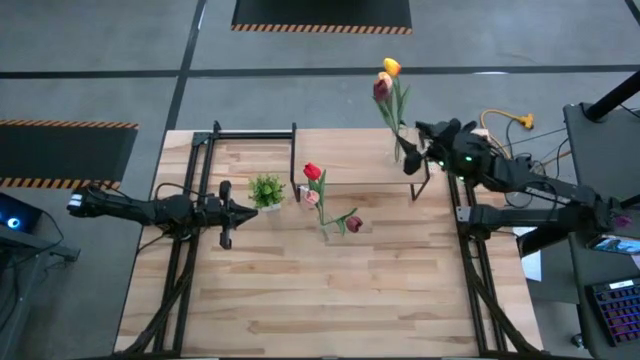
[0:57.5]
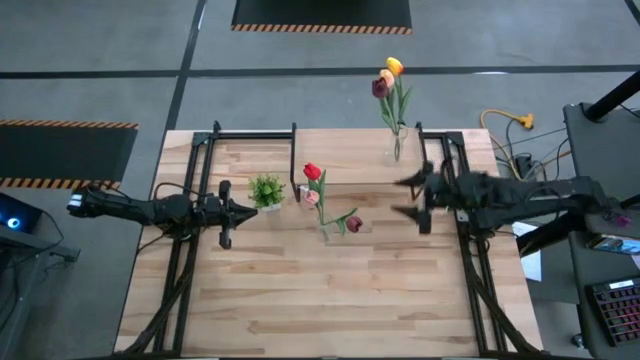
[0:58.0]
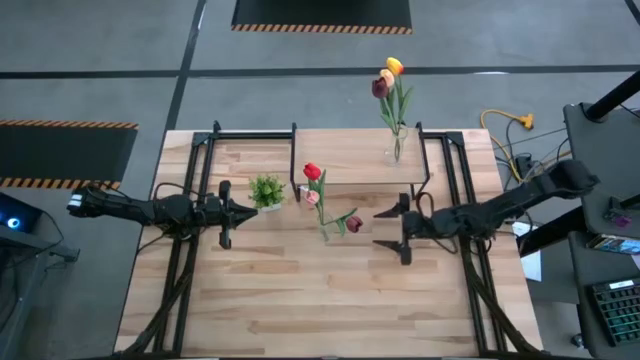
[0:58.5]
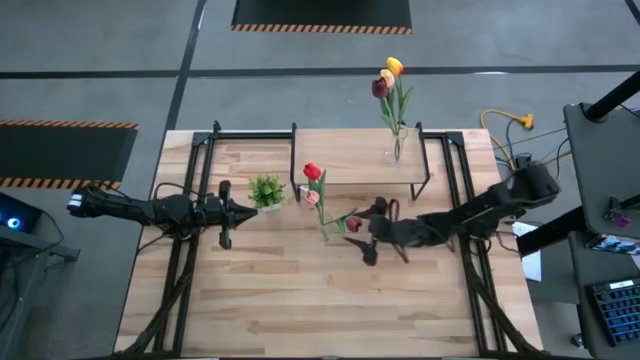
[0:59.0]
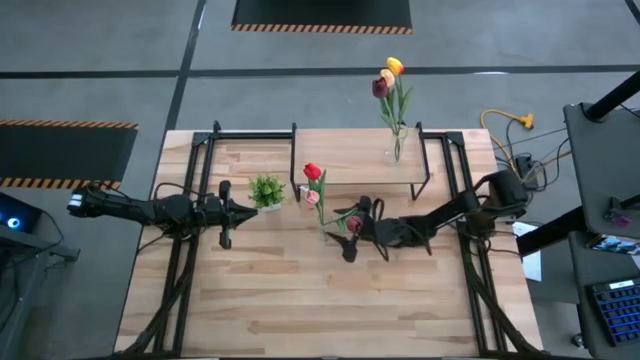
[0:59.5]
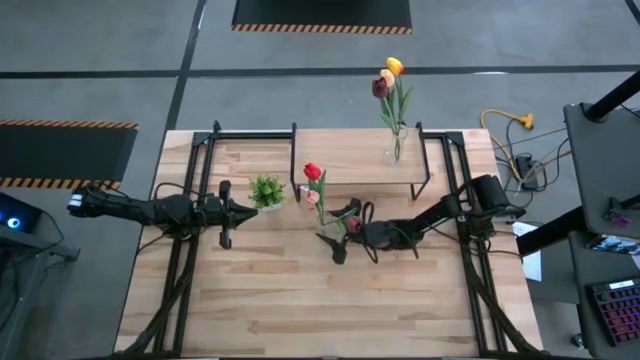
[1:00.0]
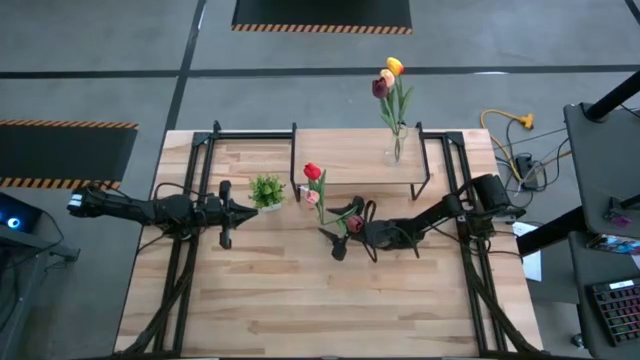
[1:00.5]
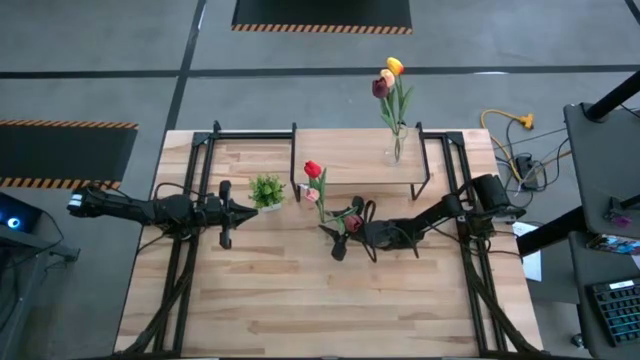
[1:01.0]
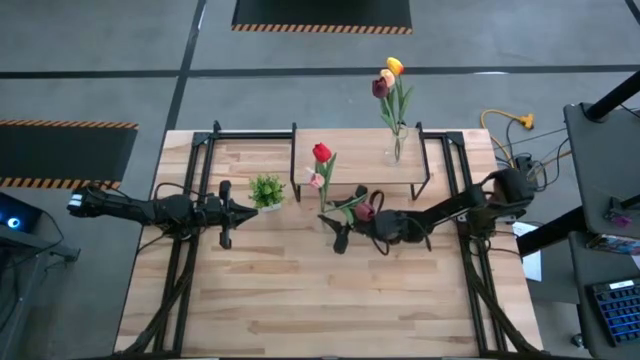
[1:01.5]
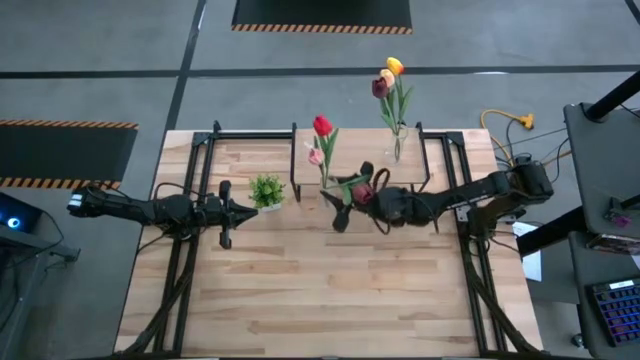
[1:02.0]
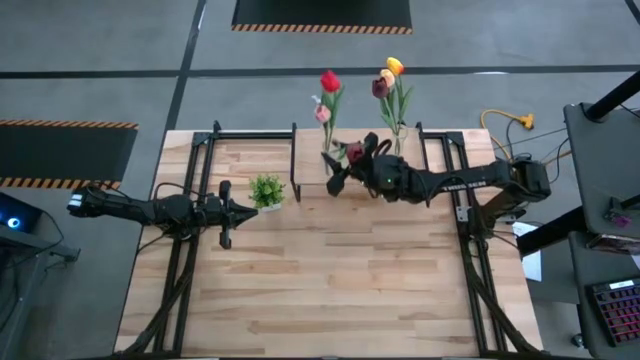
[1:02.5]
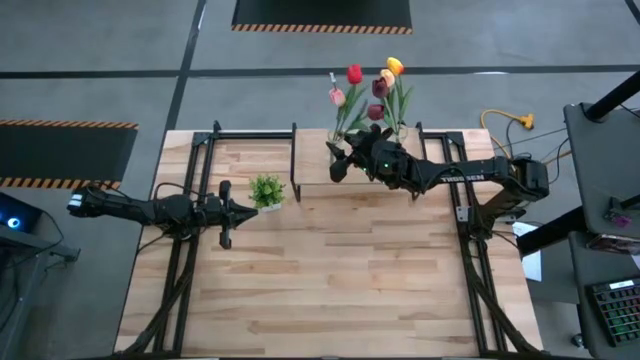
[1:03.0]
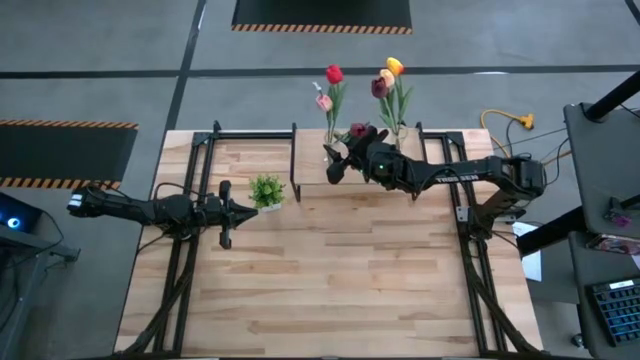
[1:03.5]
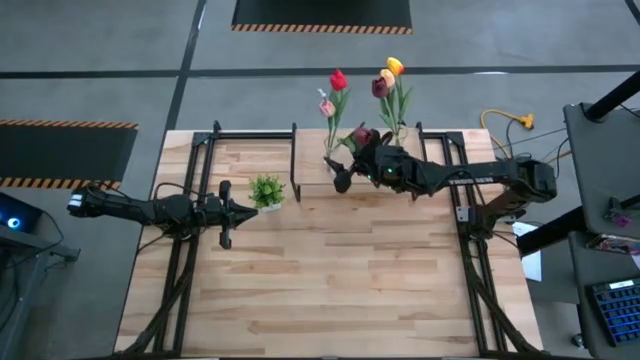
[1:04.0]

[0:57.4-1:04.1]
Task: Pick and place flowers into a vace then onto a shelf
Put the flower vase on the shelf

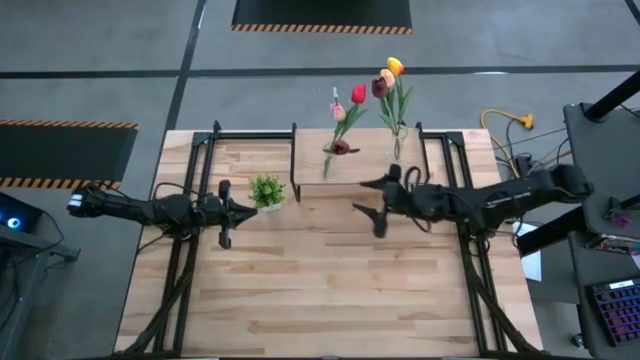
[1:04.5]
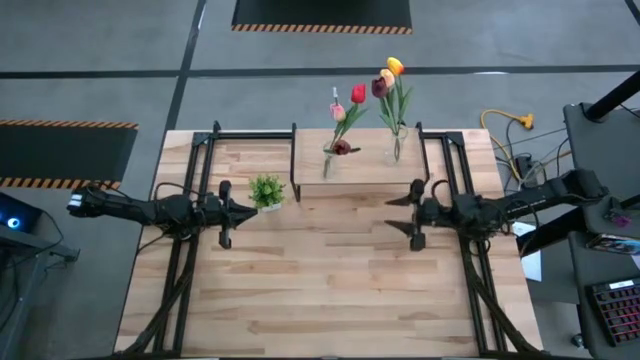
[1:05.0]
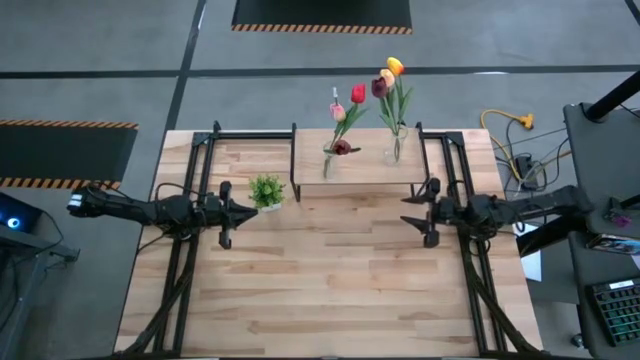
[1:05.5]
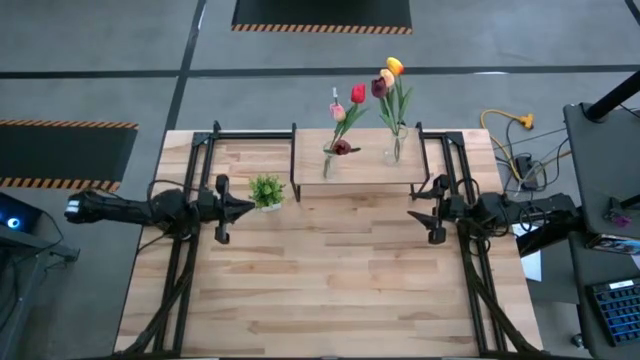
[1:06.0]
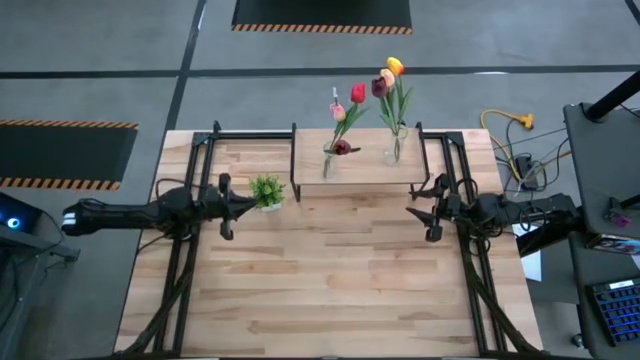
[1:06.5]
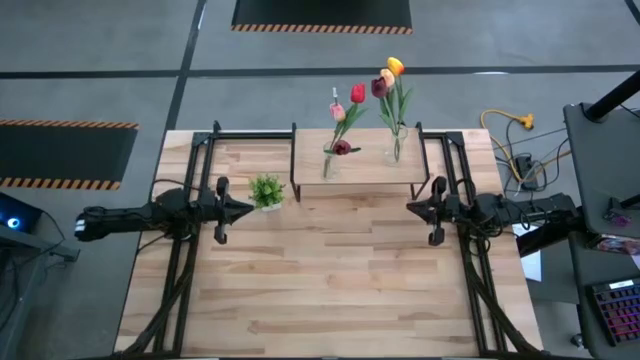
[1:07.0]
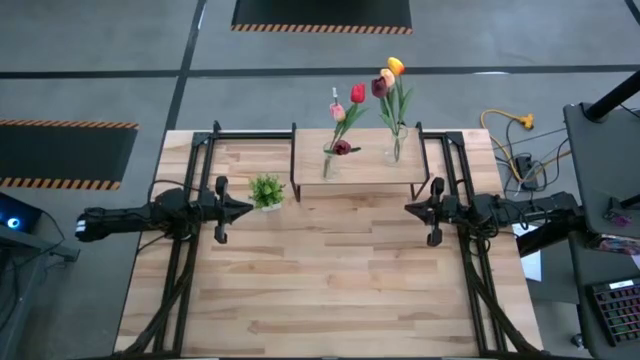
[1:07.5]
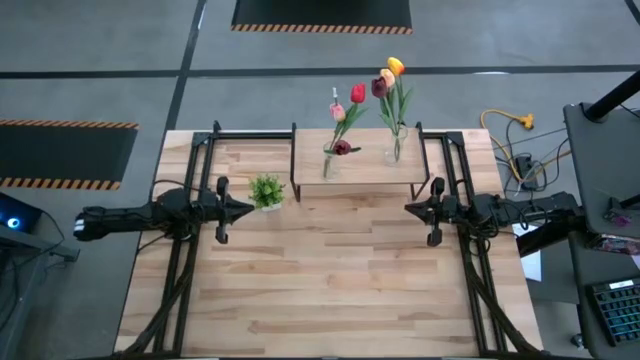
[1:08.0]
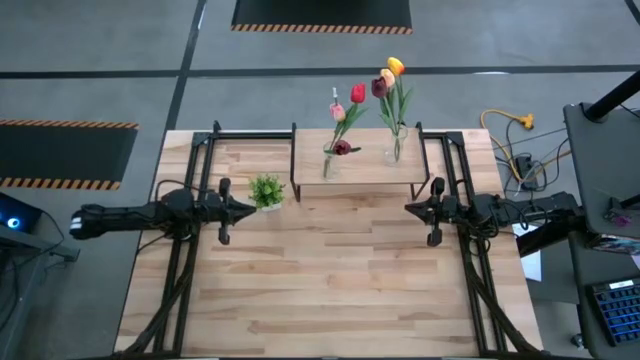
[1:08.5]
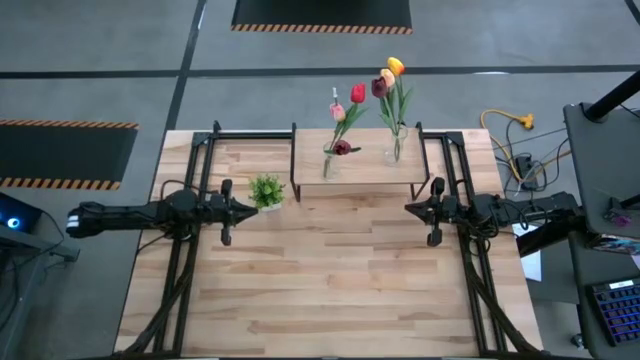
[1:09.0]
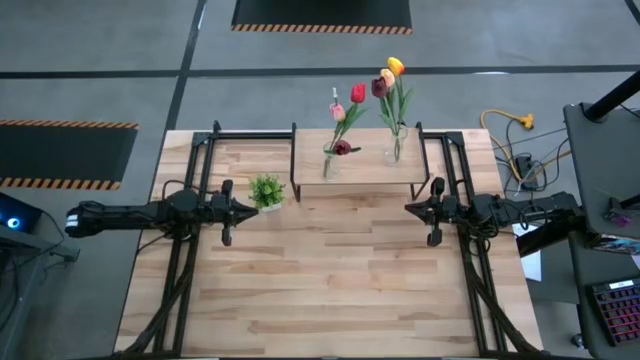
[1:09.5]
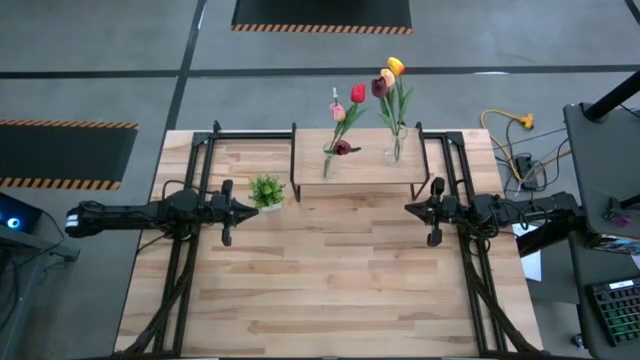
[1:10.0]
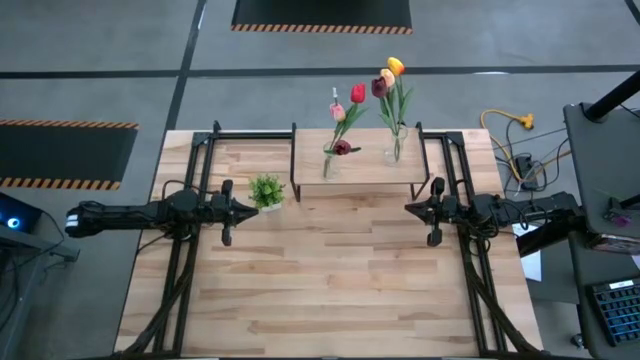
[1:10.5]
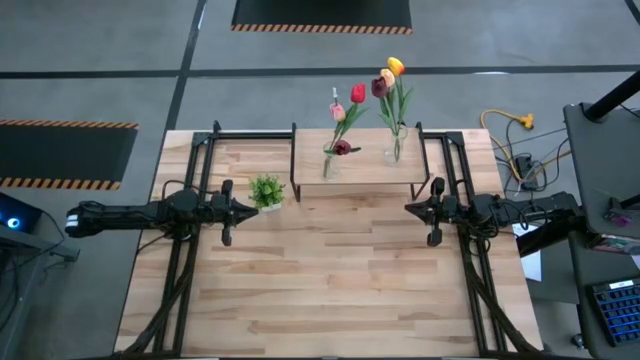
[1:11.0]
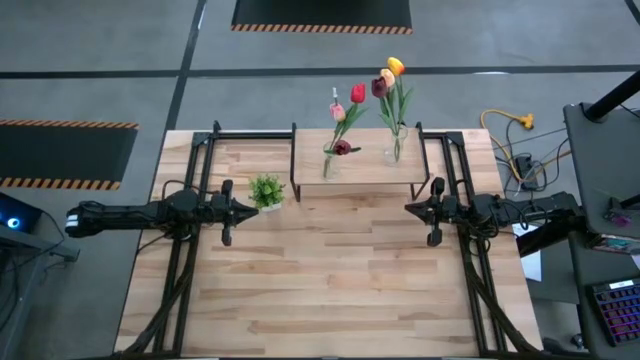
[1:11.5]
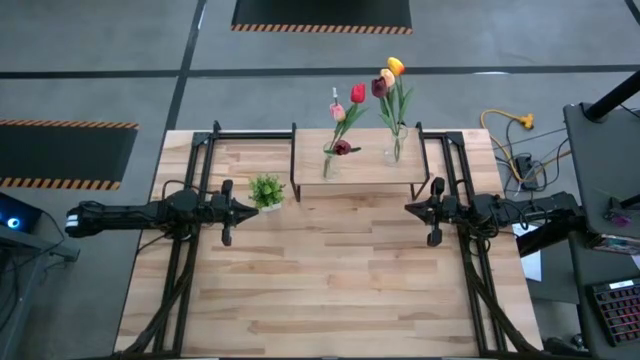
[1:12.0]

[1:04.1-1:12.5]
Return to Home Position

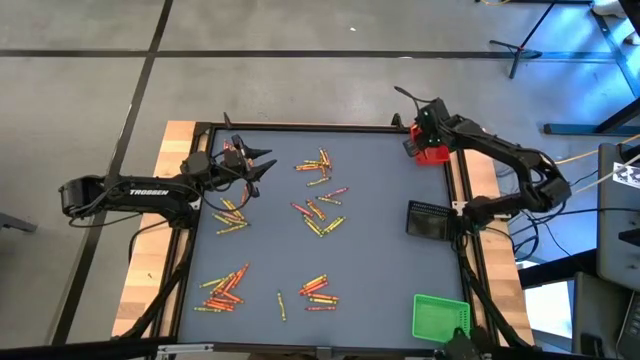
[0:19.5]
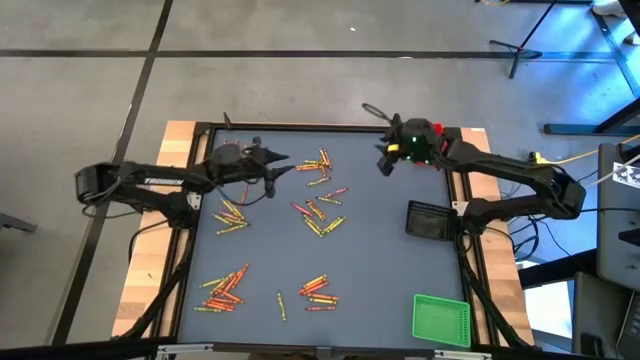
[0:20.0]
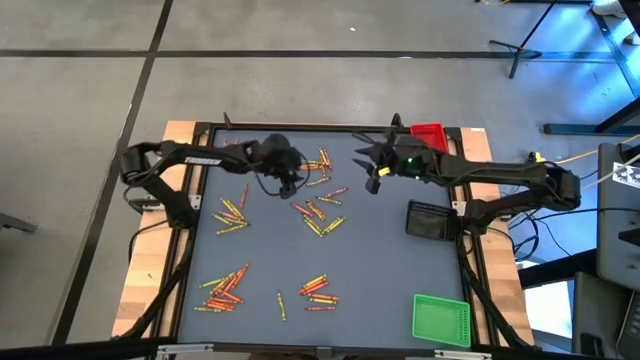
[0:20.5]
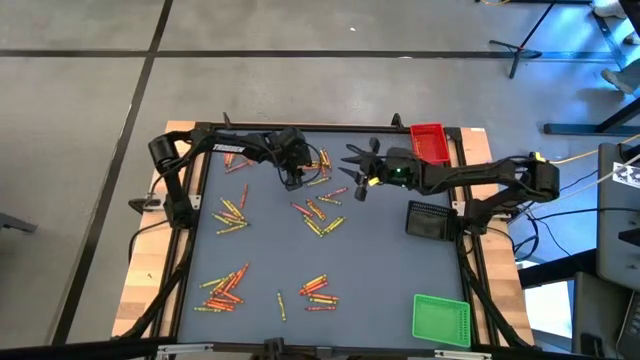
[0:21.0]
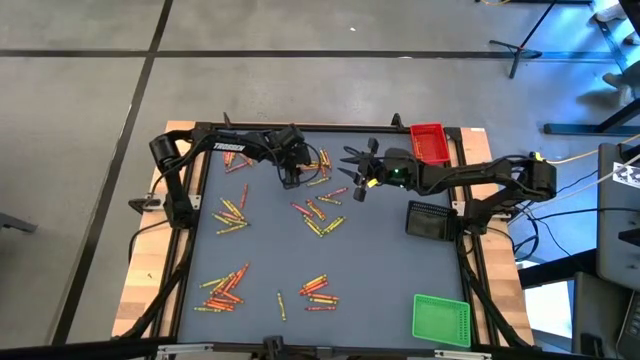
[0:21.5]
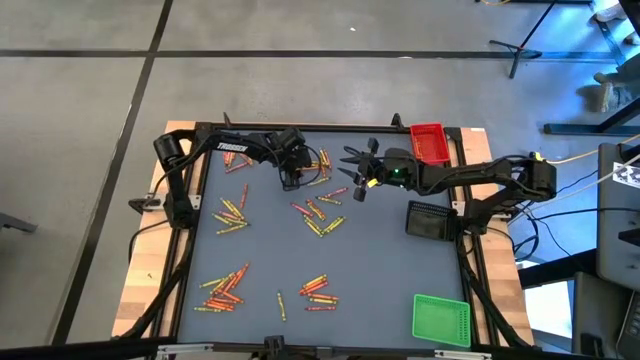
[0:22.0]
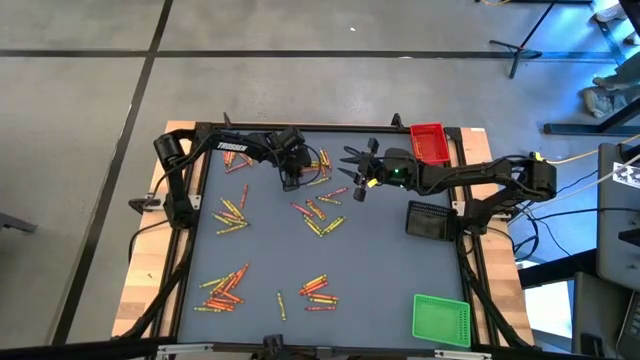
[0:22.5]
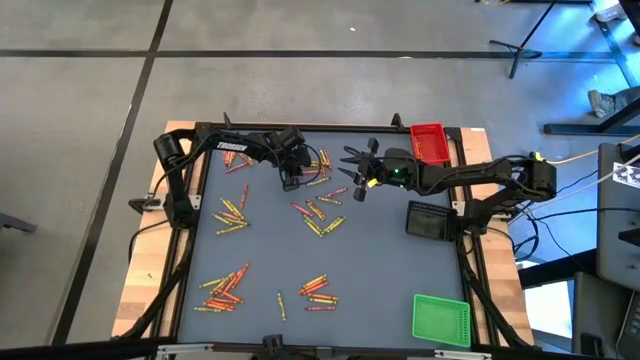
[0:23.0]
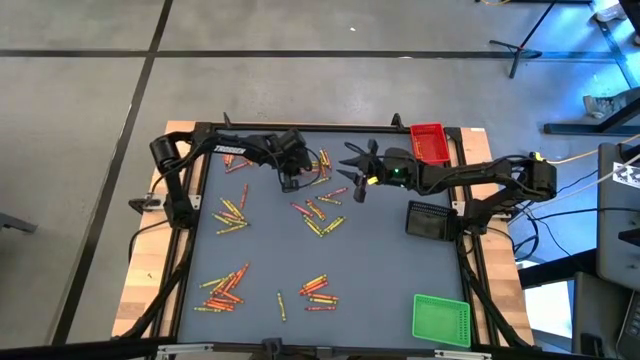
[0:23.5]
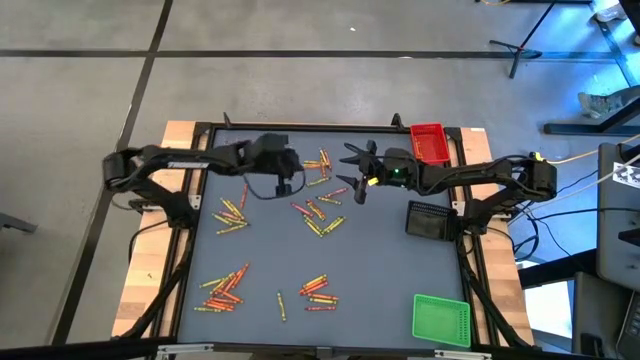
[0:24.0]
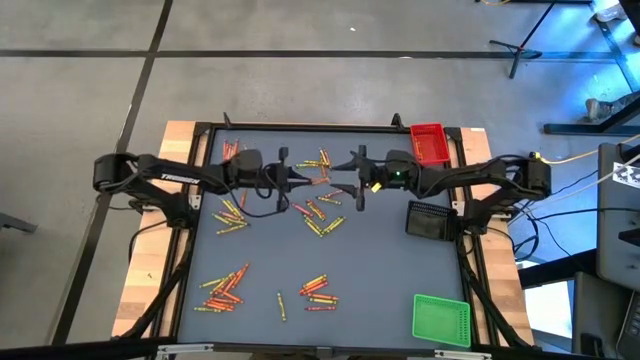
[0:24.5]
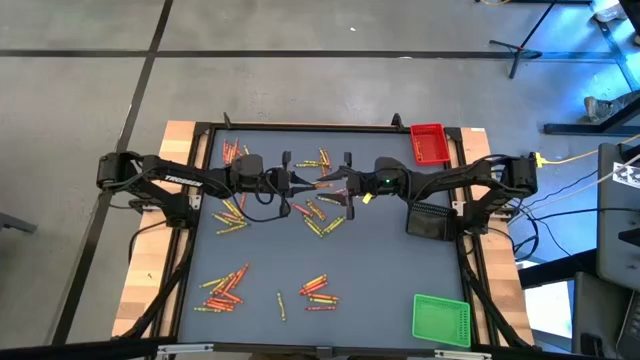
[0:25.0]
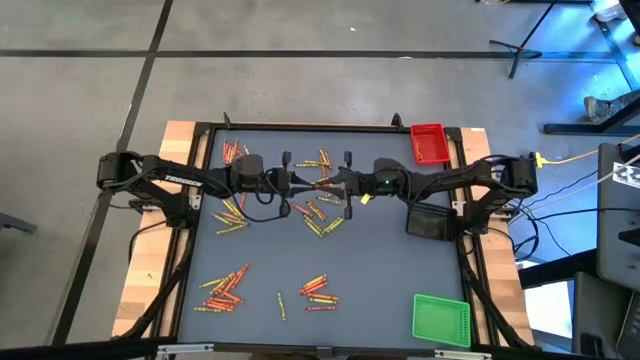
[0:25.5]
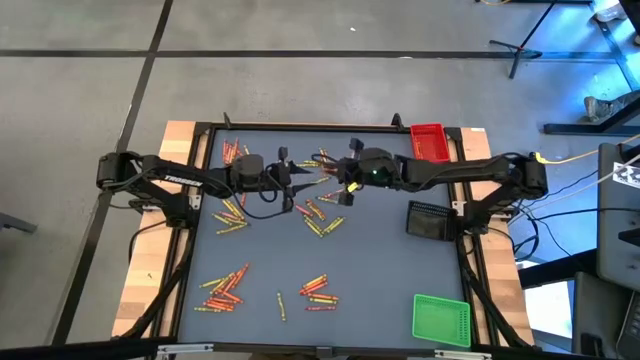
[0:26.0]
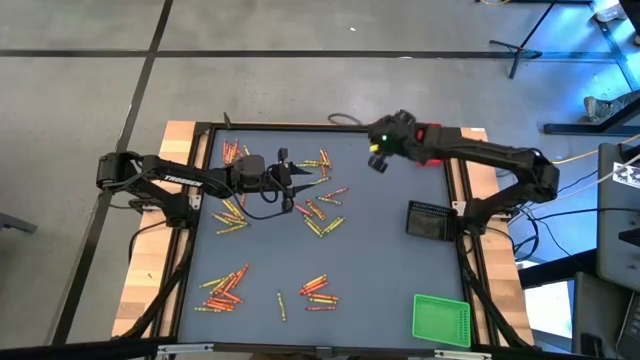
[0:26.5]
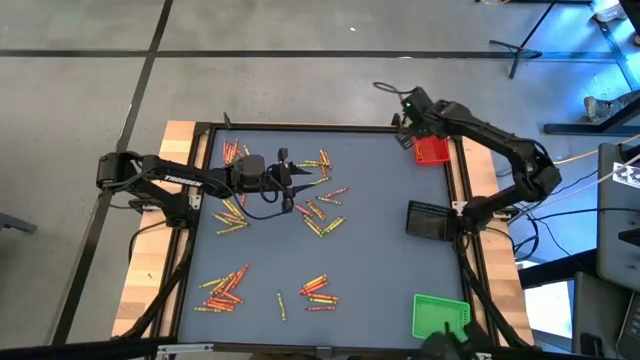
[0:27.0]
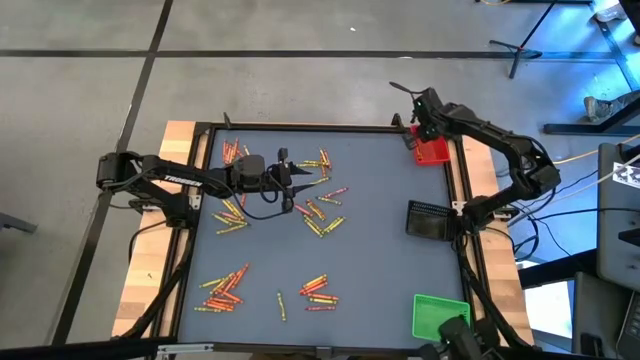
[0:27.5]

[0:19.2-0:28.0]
Task: Sort crayons
Put the orange crayon into the red basket
